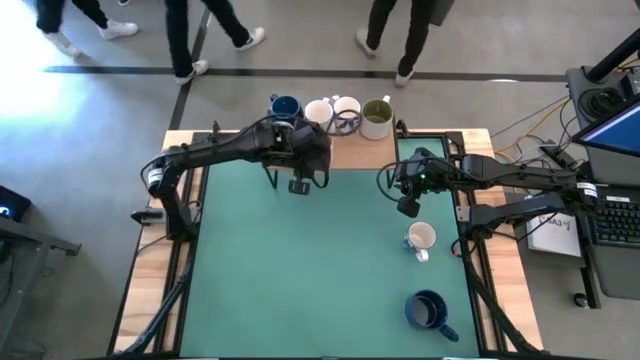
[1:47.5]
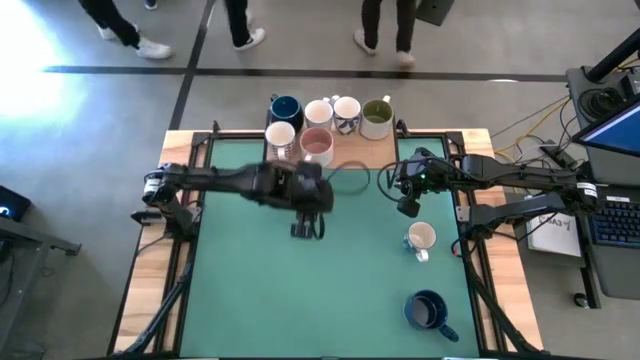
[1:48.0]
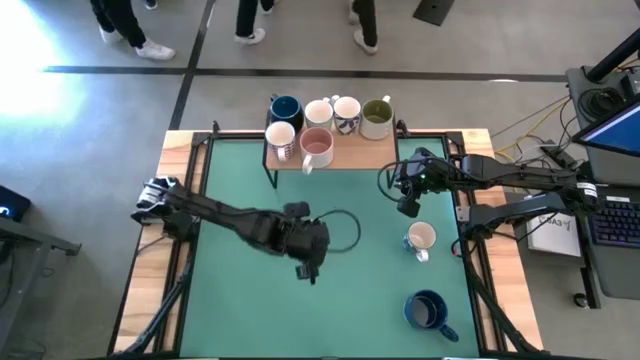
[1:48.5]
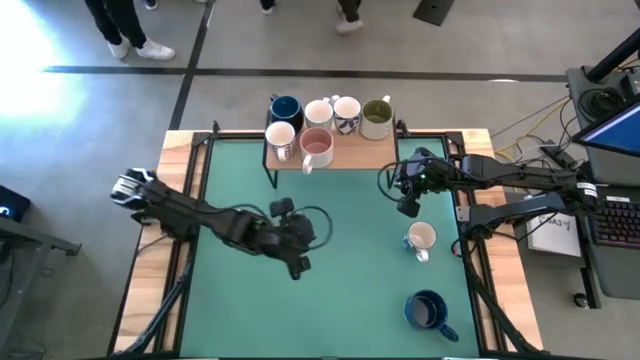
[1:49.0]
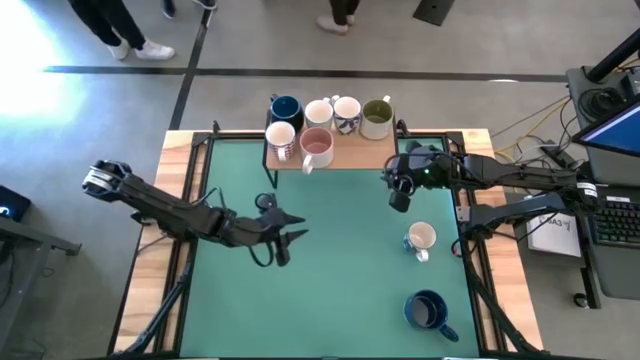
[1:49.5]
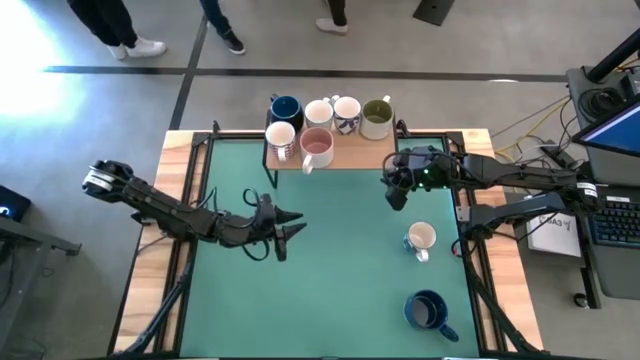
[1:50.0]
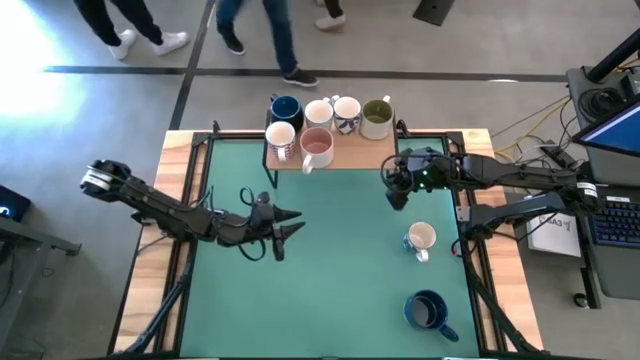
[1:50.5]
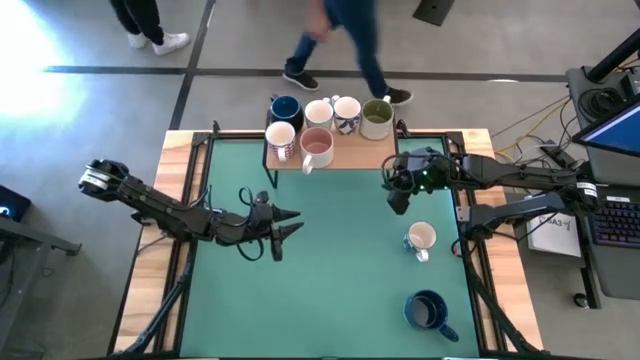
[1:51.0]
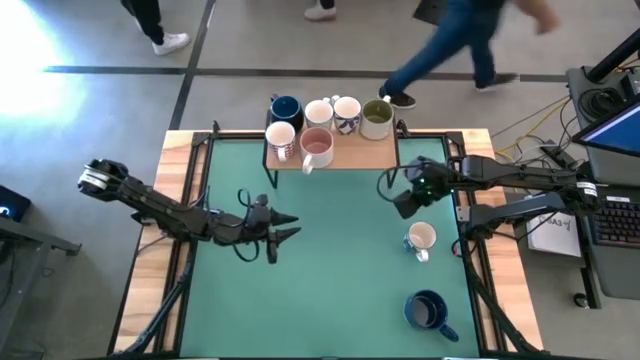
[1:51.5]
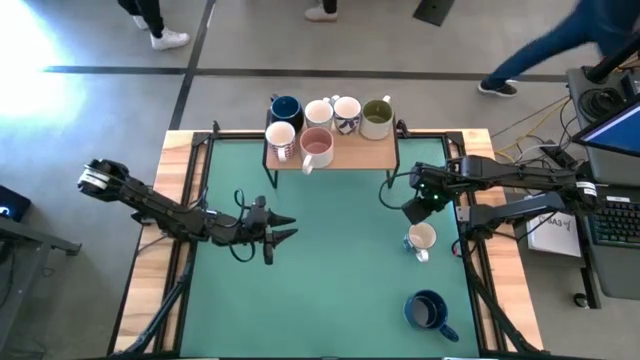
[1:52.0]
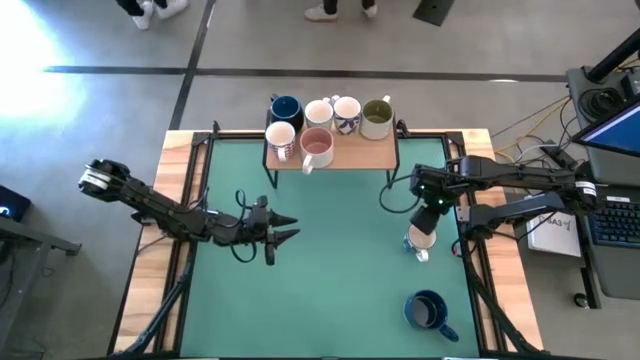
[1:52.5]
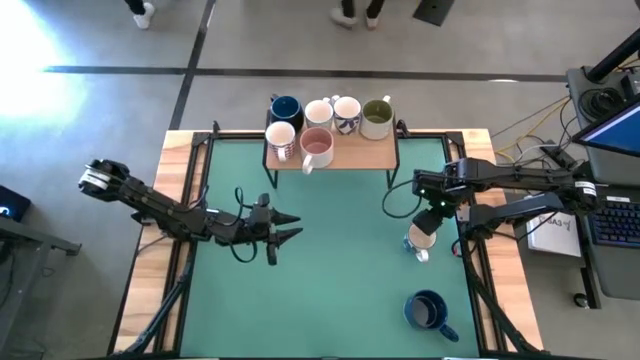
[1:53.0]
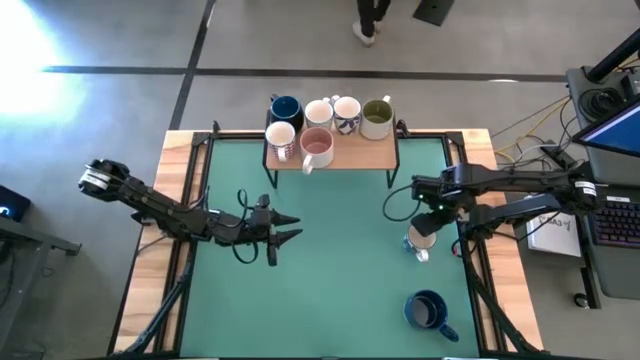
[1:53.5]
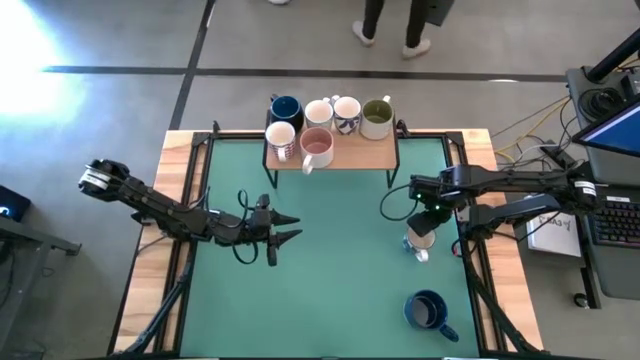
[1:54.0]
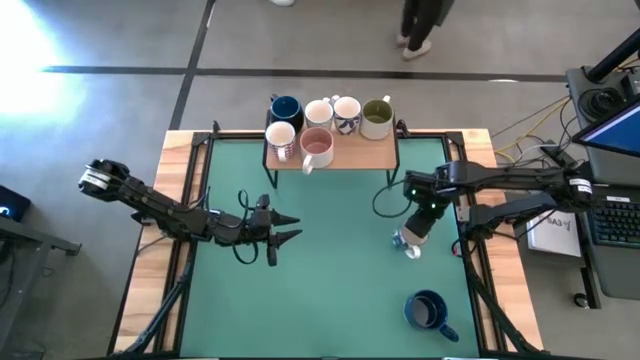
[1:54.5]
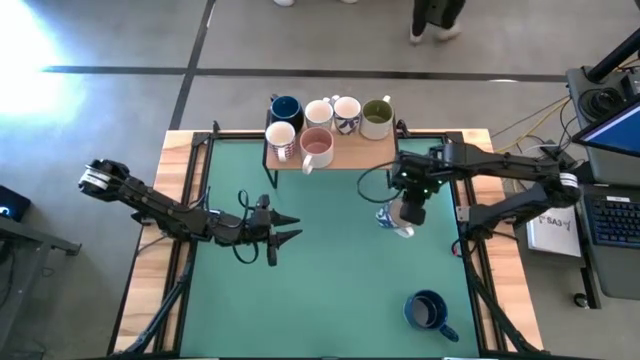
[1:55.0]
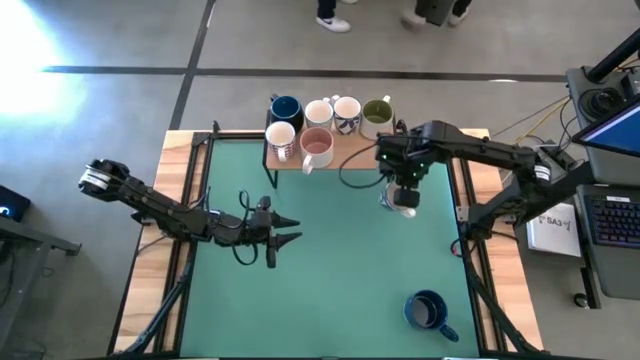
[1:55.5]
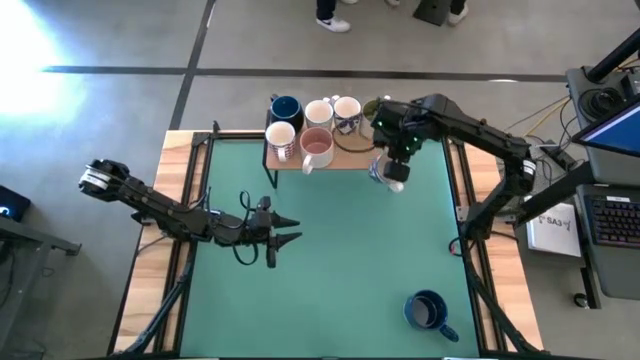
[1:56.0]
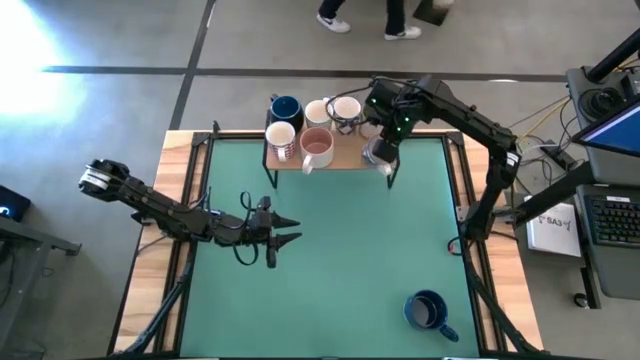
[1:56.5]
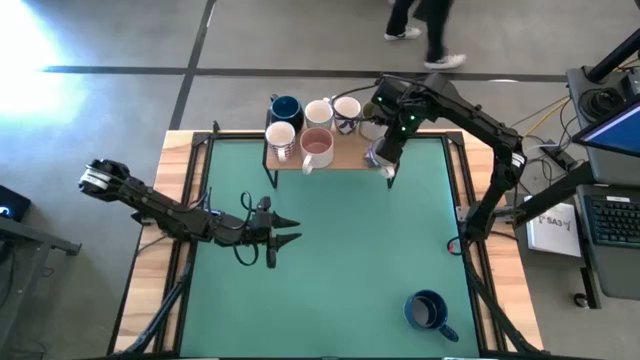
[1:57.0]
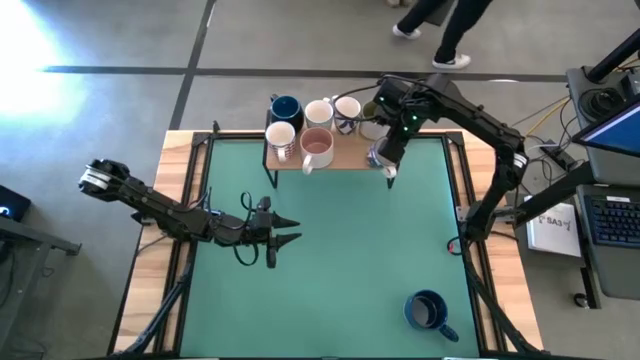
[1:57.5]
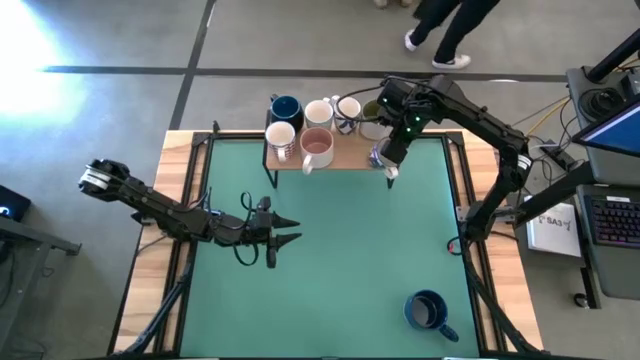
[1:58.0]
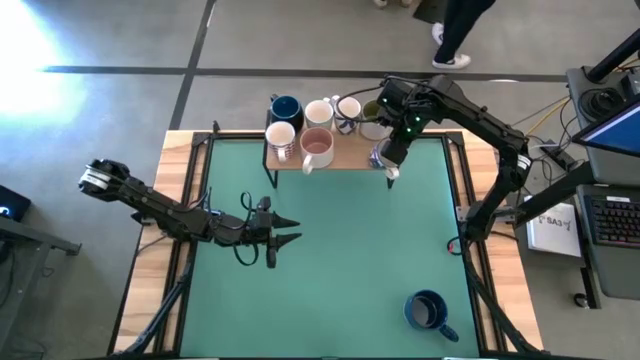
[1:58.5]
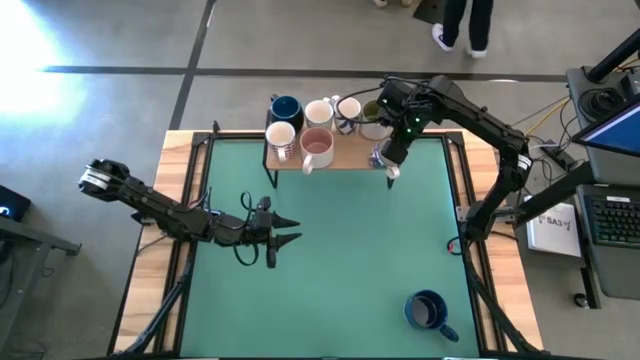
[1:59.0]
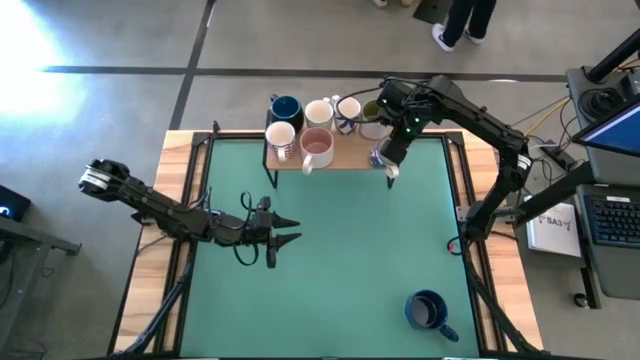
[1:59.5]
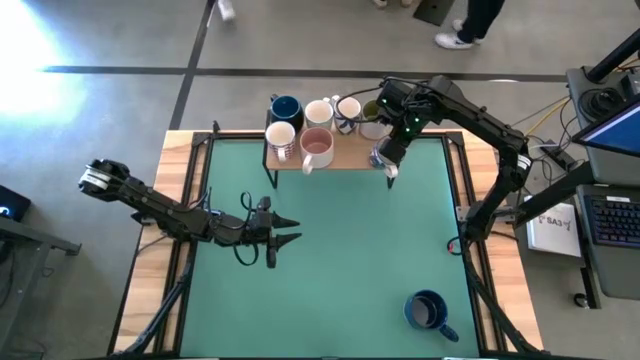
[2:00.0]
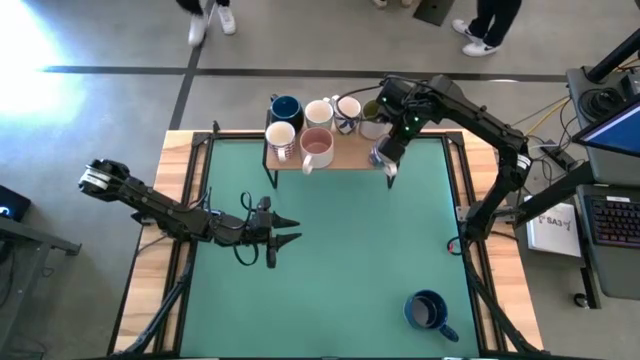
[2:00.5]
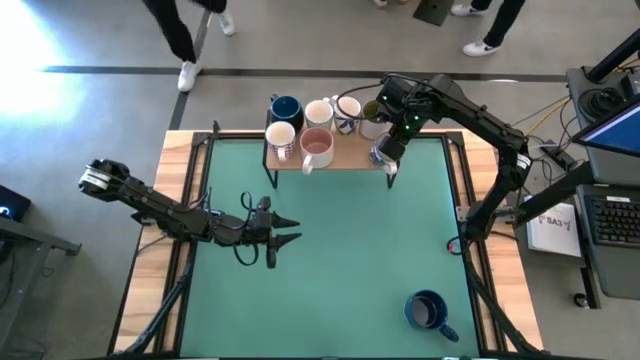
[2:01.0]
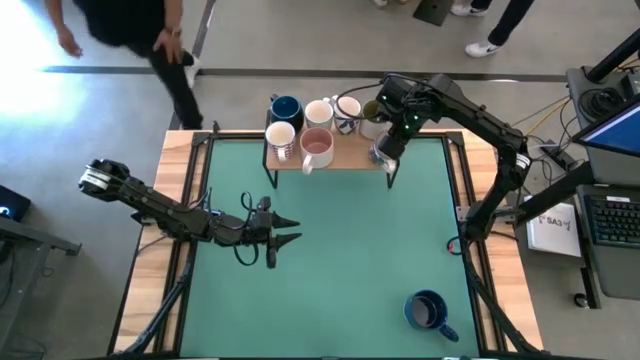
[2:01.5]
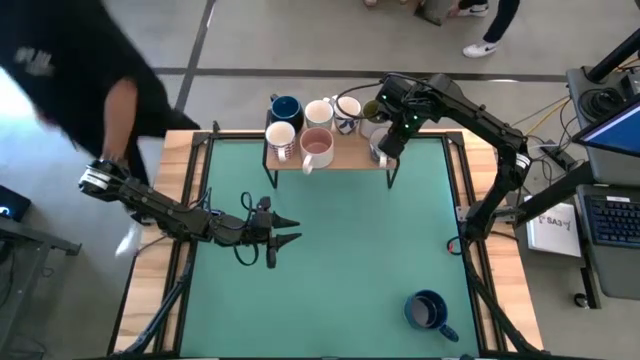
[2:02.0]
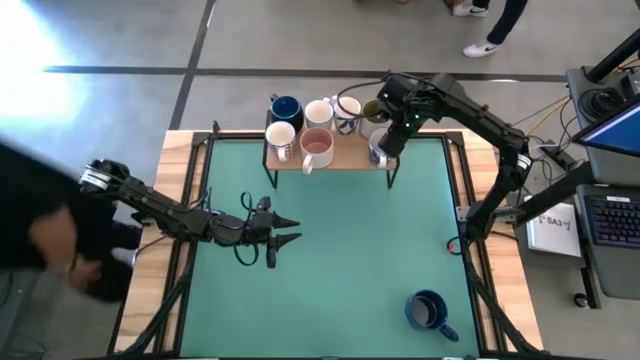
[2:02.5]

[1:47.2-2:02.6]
Task: Place coffee mugs
Put the blue mug on the shelf
